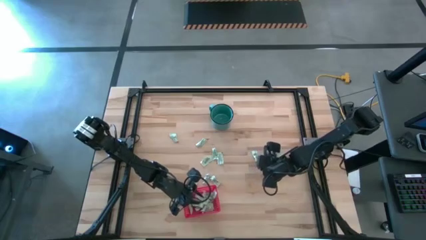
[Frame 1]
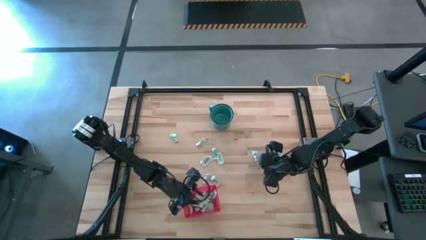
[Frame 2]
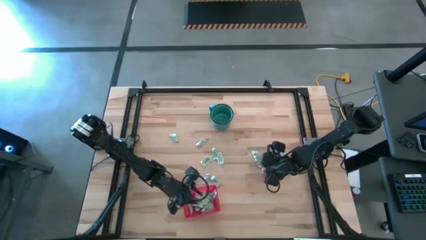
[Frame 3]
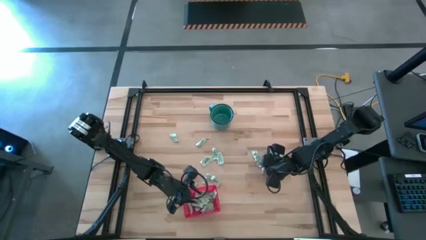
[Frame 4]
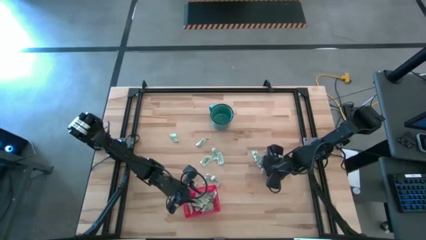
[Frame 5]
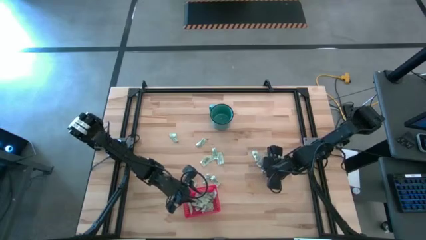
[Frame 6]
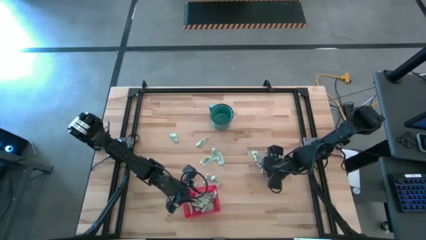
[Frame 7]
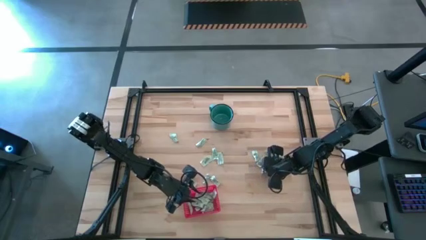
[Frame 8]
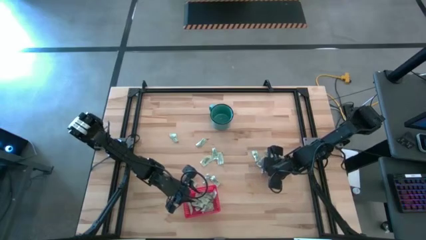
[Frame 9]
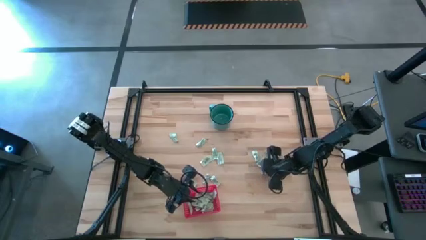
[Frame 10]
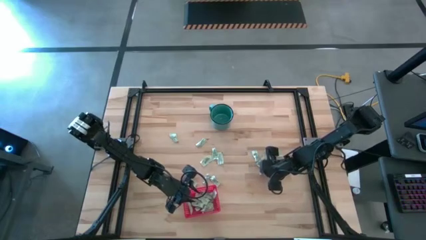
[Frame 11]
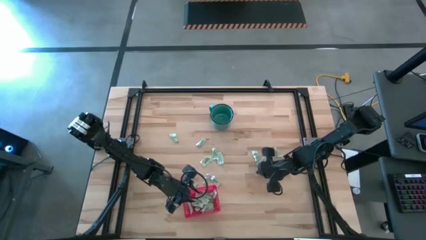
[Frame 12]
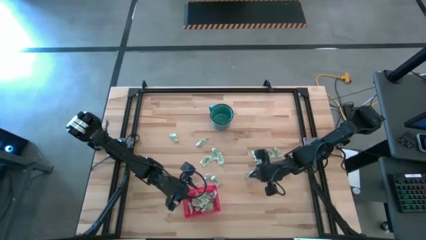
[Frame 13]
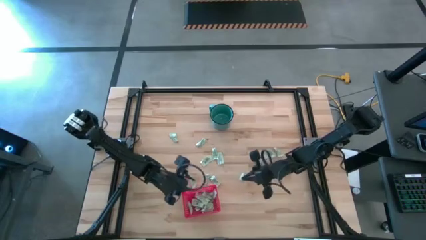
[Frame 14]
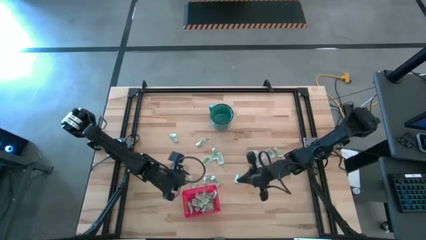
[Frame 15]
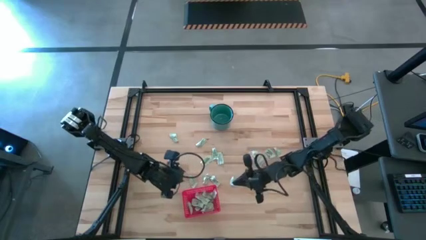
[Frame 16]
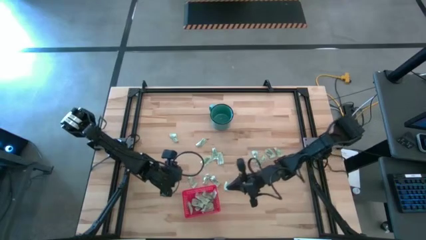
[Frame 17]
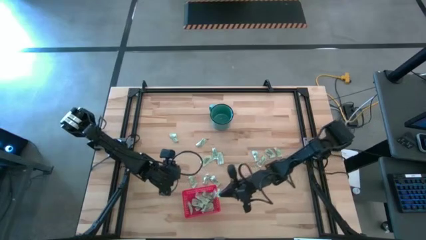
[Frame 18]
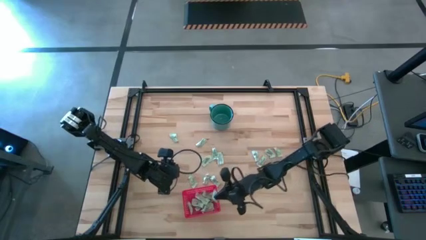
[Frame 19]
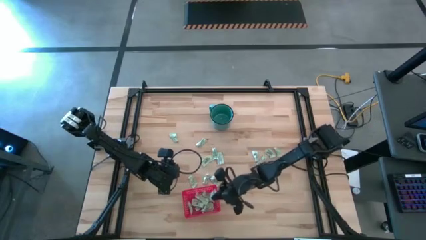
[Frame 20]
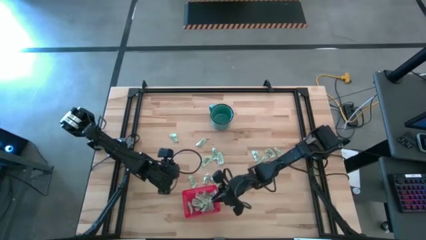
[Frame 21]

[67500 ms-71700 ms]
Task: Pick and place items into bin
Put the green stevia packet into the red bin

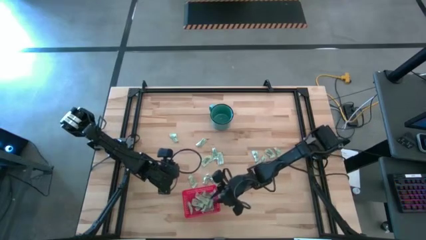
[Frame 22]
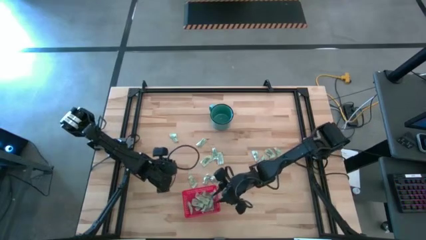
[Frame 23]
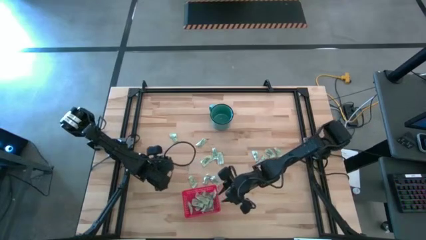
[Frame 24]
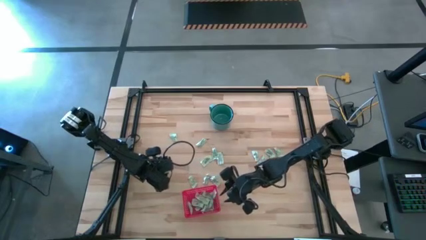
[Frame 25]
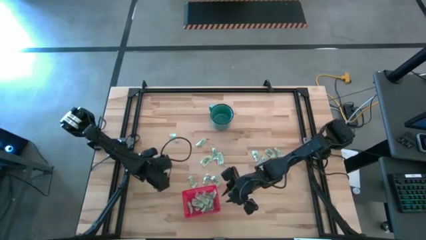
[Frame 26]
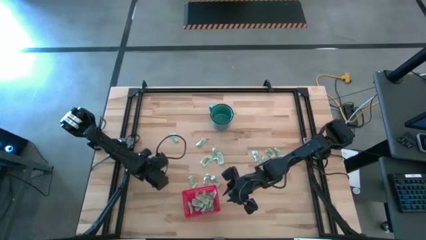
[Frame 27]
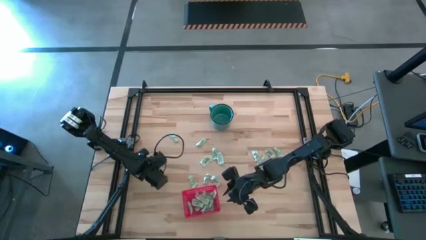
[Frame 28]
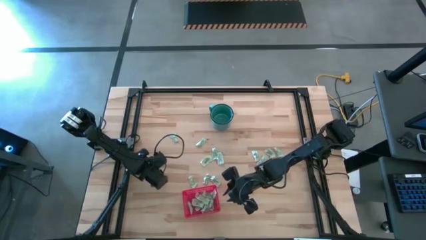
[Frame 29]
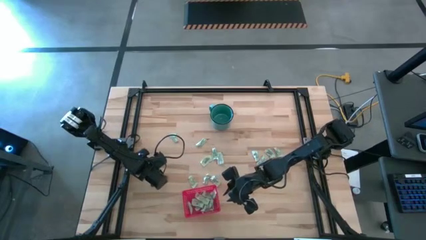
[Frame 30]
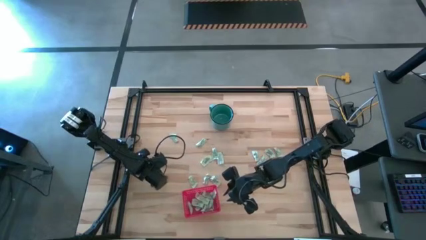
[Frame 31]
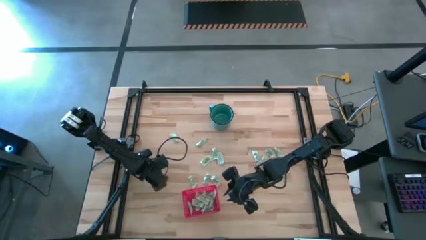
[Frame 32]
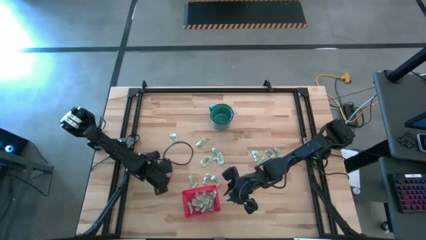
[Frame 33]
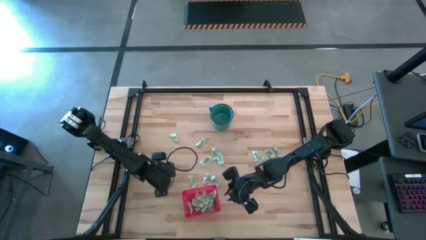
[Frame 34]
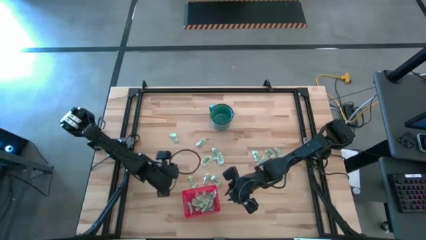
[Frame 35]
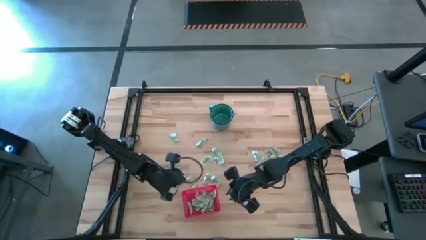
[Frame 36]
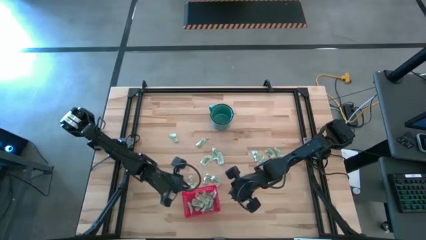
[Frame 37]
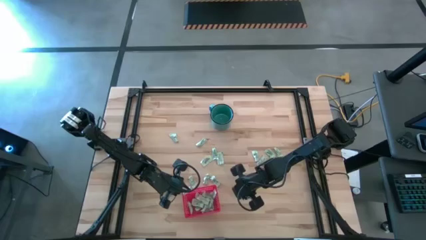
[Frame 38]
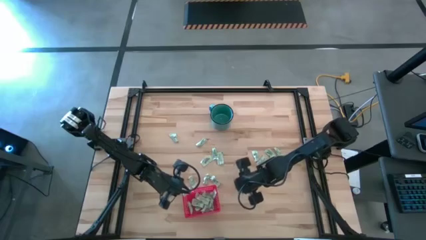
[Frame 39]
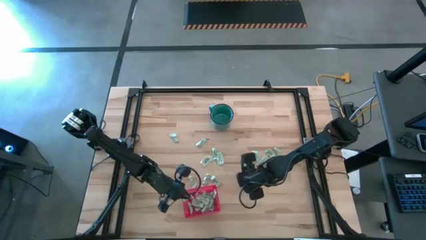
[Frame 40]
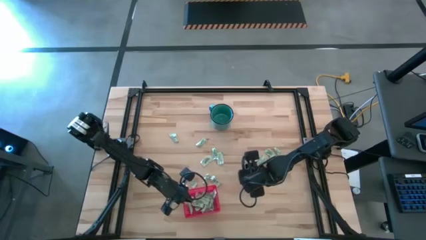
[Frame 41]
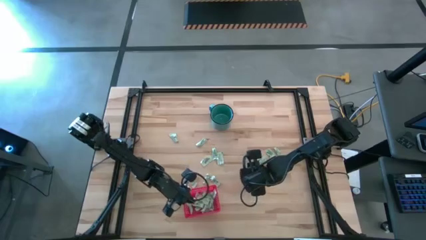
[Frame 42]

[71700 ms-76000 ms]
Put the green stevia packet into the red bin

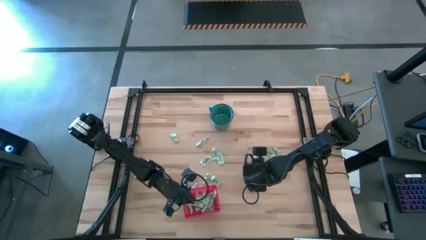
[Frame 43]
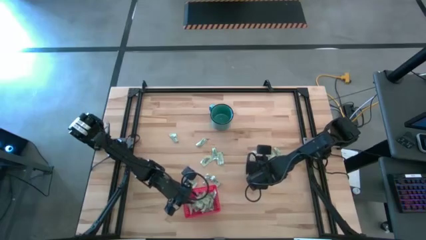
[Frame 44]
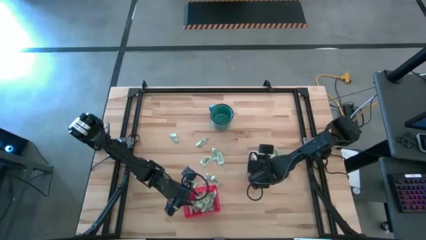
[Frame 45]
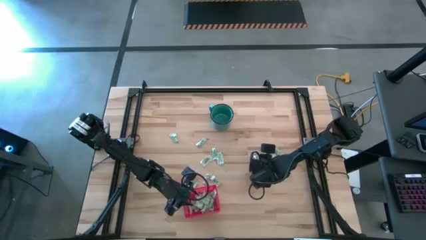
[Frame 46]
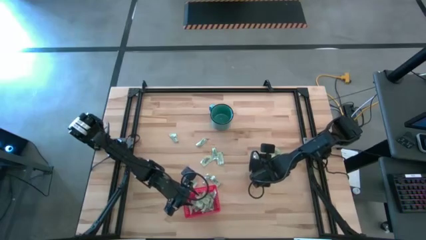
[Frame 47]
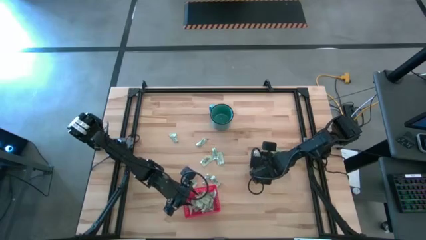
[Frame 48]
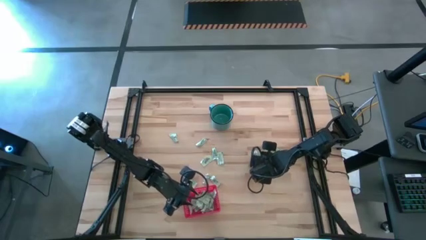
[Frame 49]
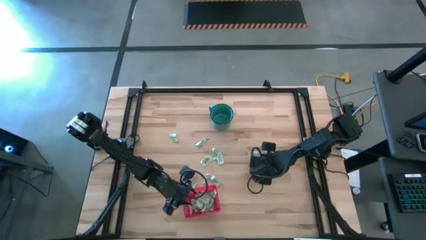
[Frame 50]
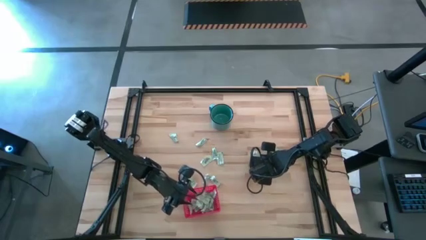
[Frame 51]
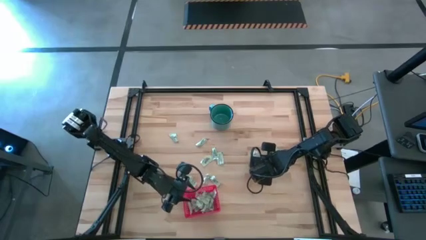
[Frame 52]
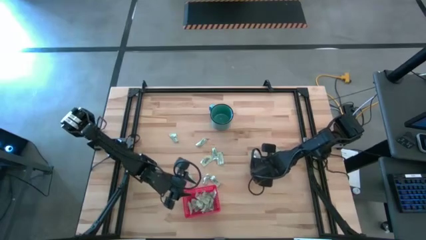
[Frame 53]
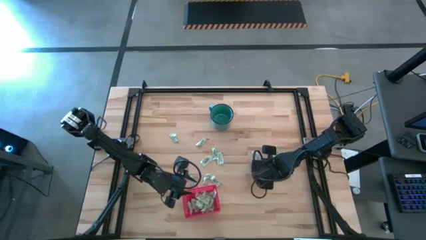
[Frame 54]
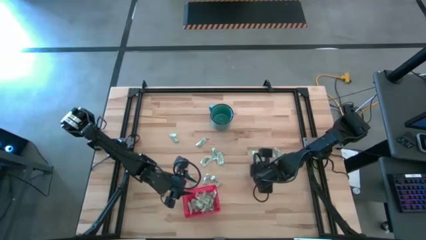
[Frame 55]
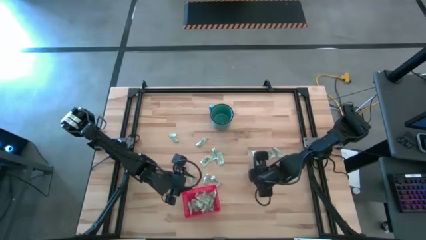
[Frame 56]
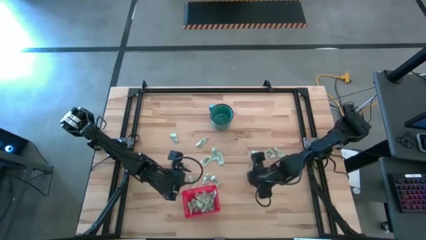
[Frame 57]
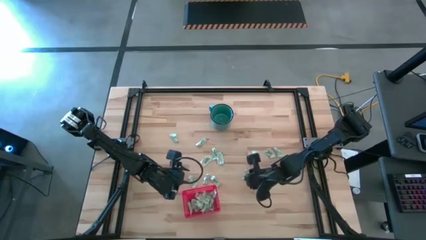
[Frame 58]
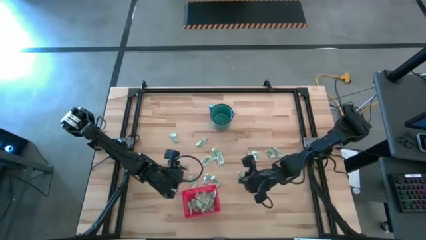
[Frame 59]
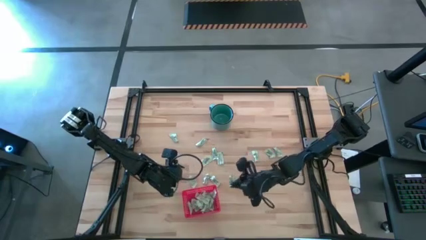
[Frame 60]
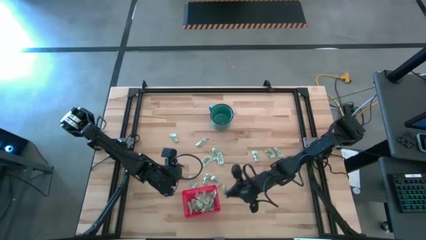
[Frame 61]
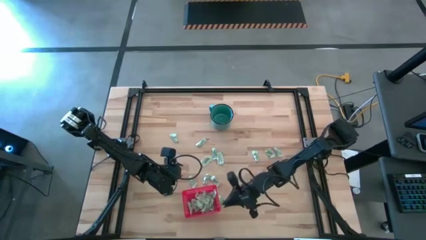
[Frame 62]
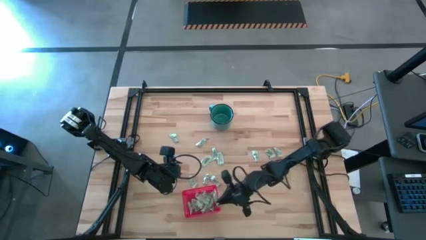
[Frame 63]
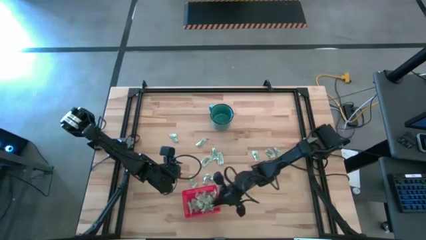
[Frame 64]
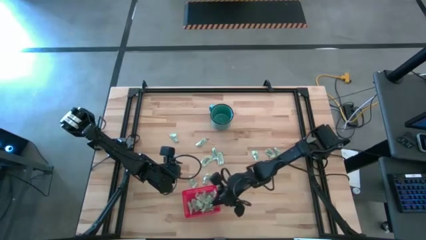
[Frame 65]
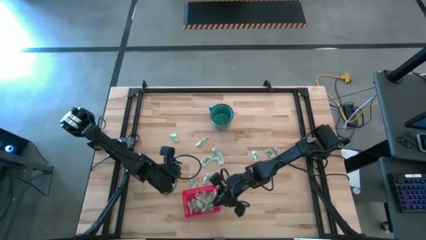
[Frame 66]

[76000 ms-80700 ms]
Put the green stevia packet into the red bin

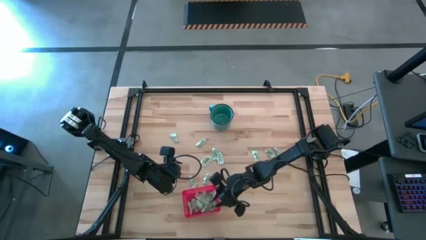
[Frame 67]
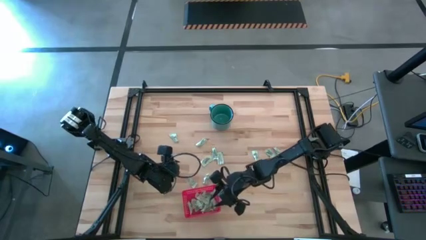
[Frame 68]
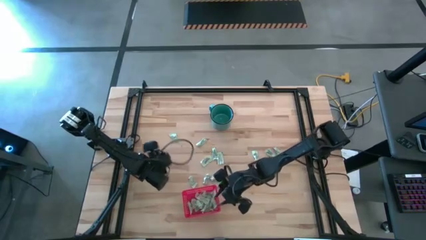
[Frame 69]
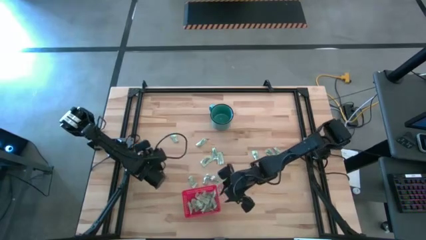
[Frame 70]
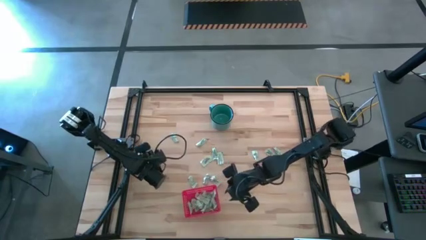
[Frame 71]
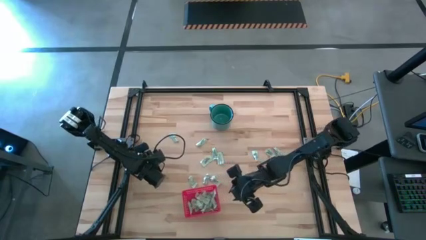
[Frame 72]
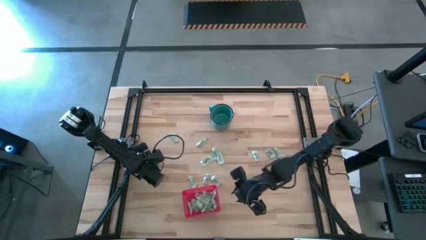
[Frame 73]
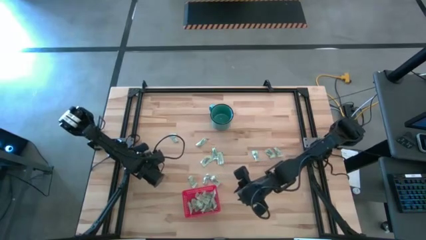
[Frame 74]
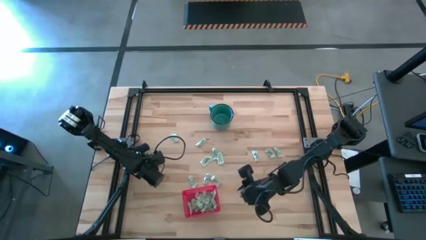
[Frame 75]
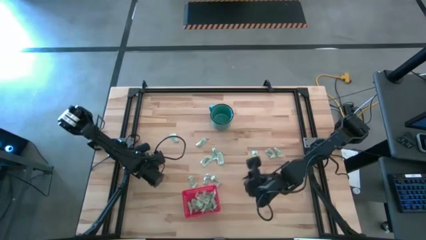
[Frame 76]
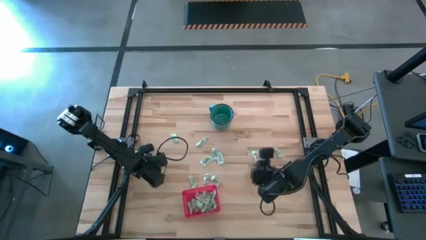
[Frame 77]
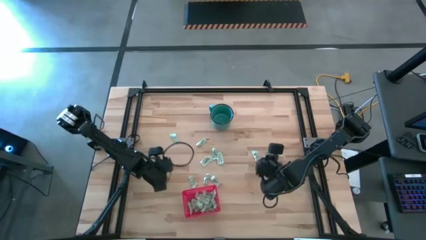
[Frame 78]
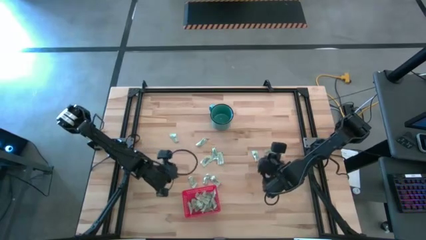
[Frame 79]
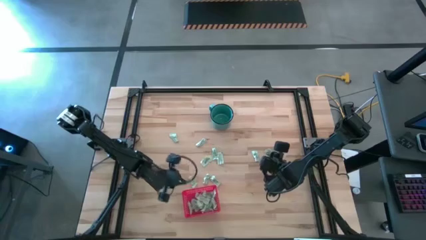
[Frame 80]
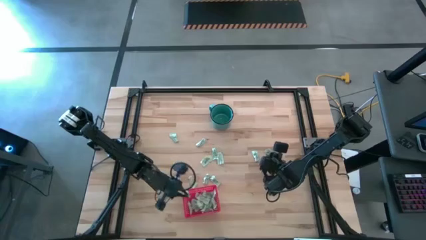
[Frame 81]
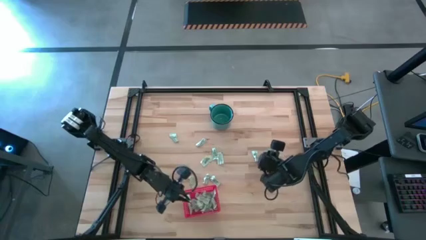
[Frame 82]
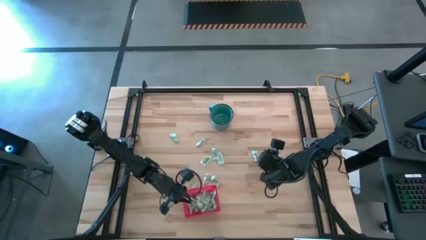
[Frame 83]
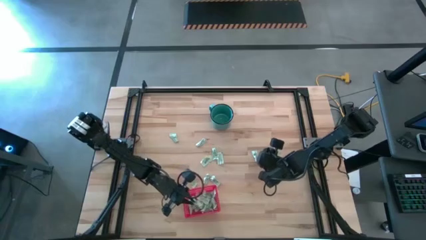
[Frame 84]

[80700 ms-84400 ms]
Put the green stevia packet into the red bin

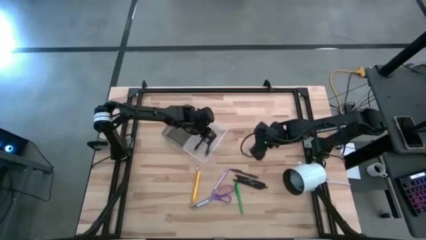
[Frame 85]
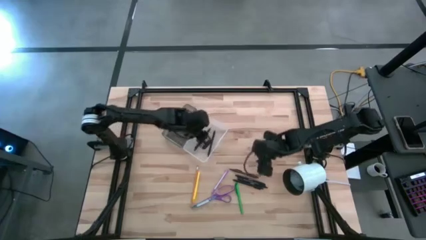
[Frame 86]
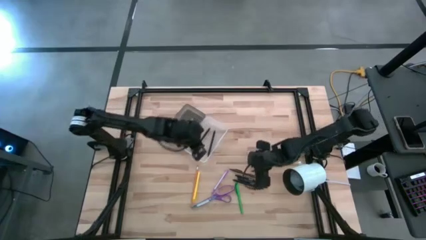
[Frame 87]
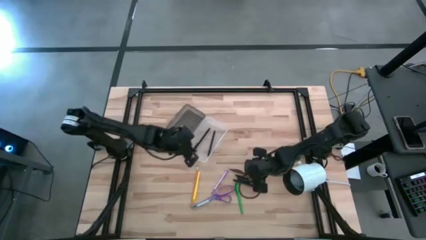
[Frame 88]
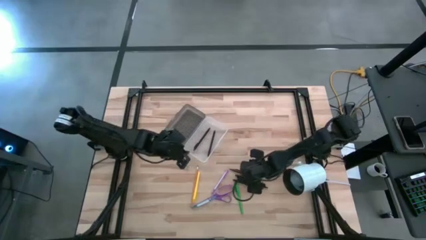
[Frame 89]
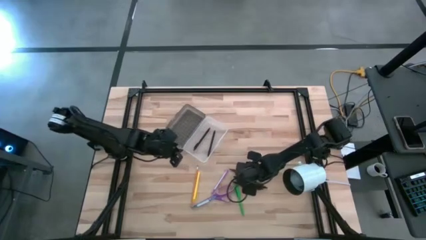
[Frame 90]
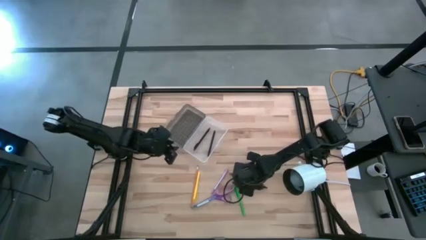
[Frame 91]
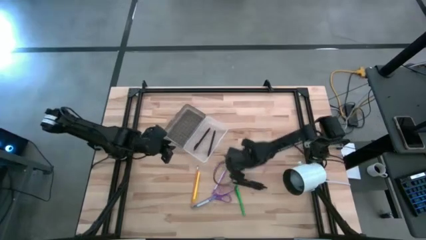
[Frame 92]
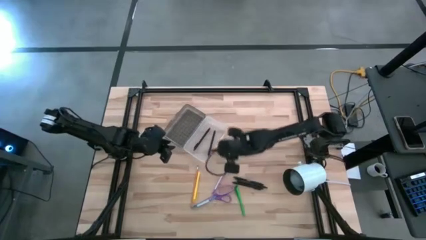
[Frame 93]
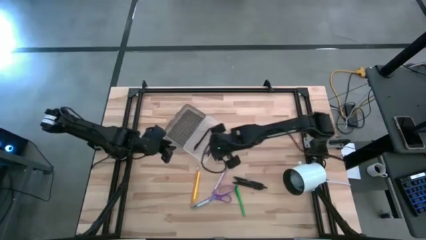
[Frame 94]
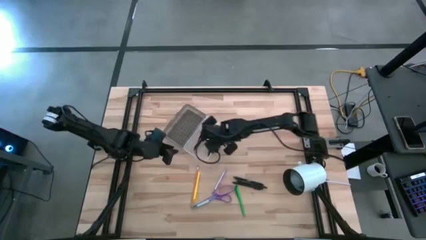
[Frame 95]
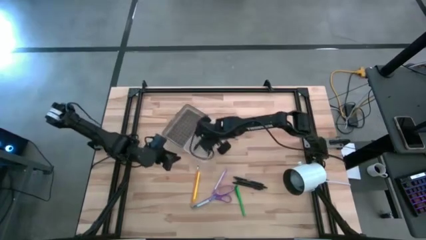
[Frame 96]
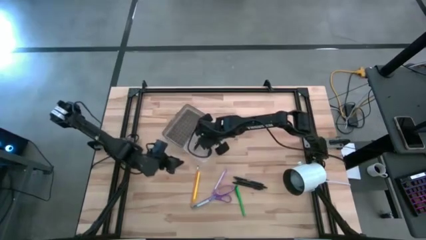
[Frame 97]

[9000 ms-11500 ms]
Task: Pick & place school supplies into a supply box
Put the brown pen into the black supply box
